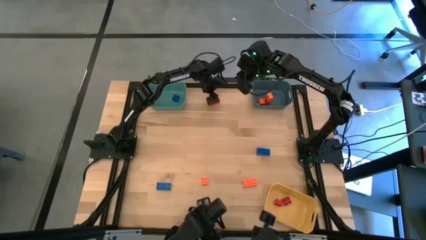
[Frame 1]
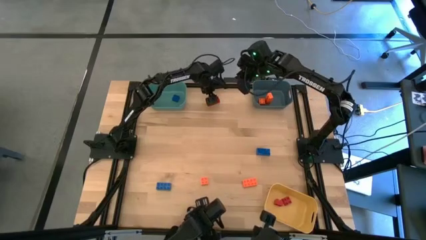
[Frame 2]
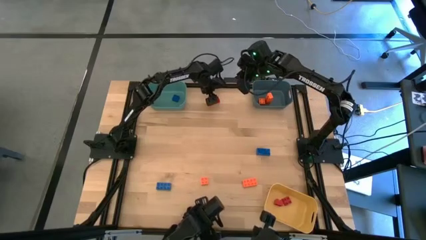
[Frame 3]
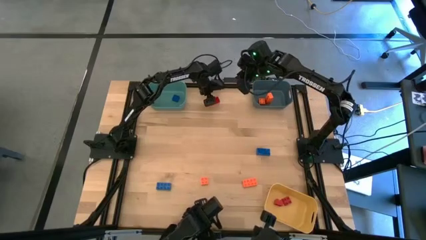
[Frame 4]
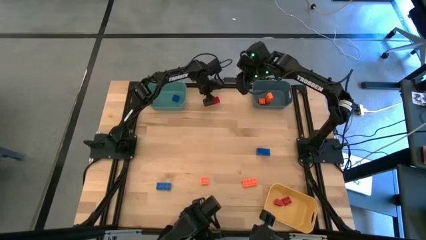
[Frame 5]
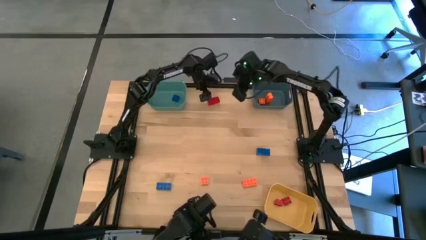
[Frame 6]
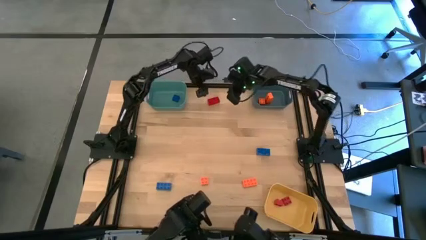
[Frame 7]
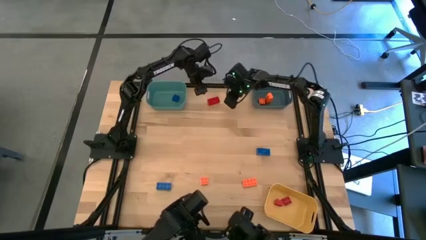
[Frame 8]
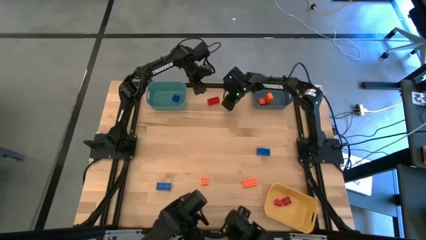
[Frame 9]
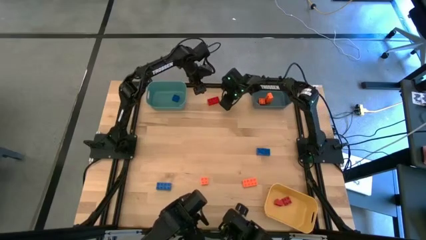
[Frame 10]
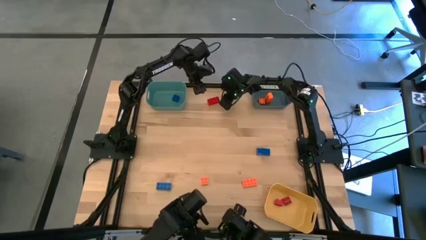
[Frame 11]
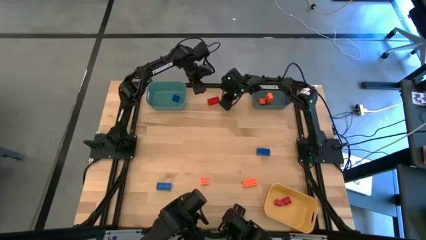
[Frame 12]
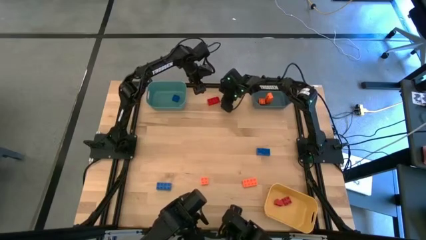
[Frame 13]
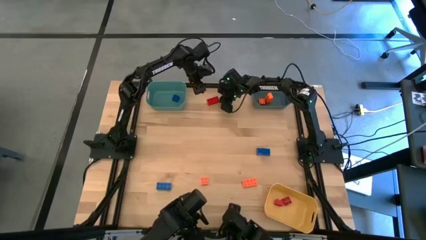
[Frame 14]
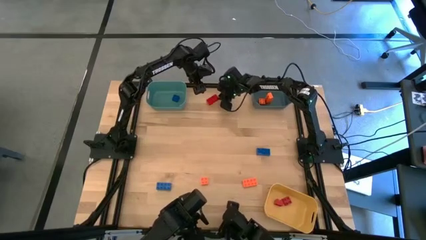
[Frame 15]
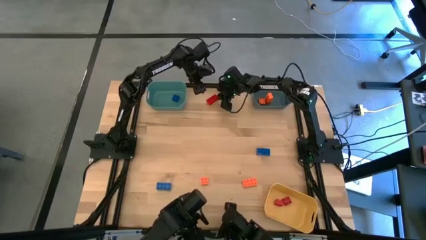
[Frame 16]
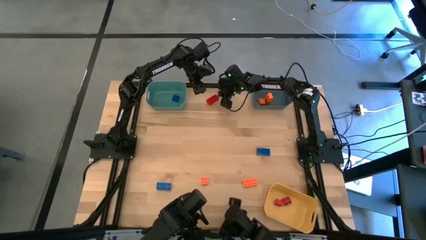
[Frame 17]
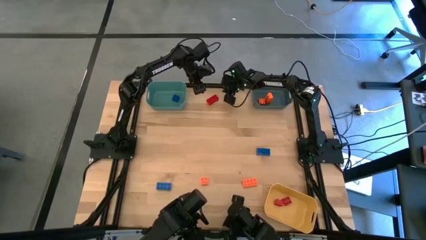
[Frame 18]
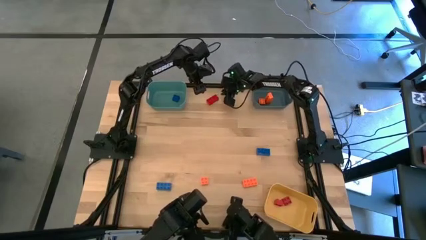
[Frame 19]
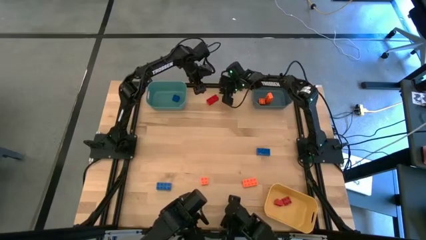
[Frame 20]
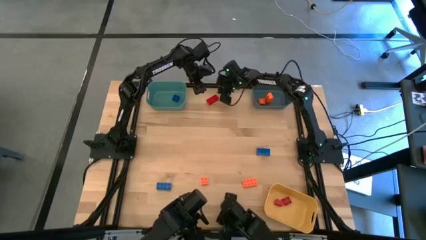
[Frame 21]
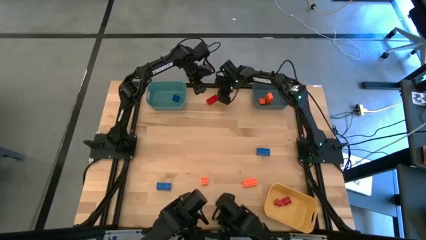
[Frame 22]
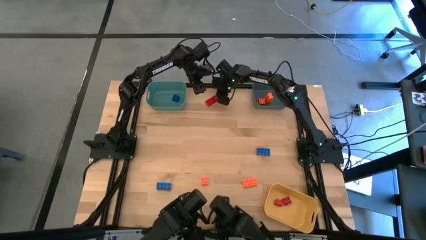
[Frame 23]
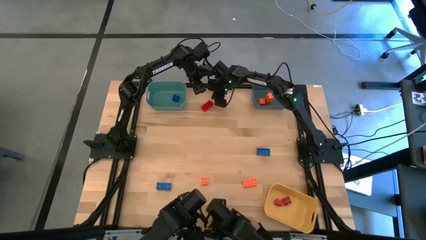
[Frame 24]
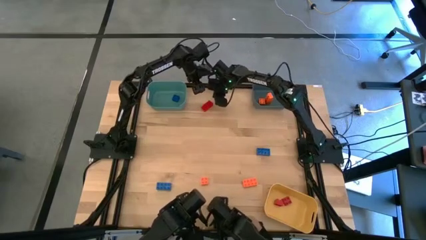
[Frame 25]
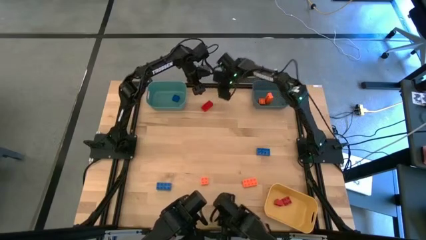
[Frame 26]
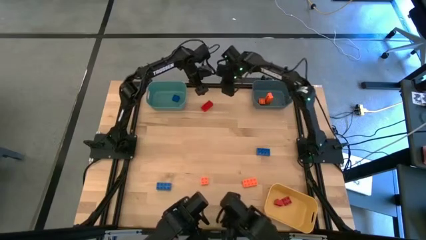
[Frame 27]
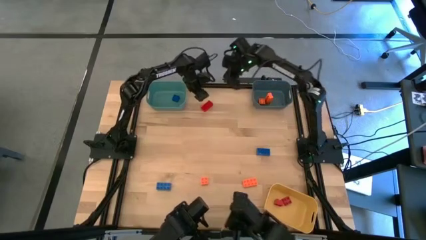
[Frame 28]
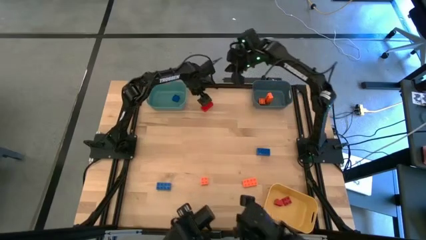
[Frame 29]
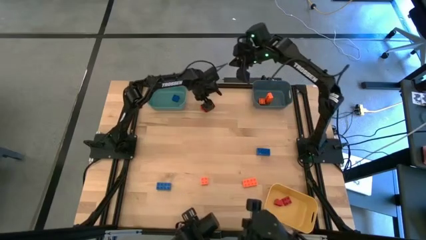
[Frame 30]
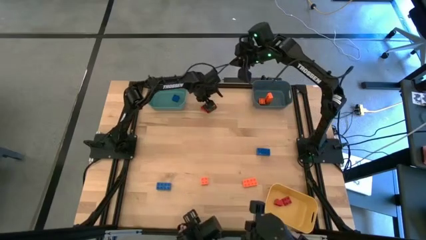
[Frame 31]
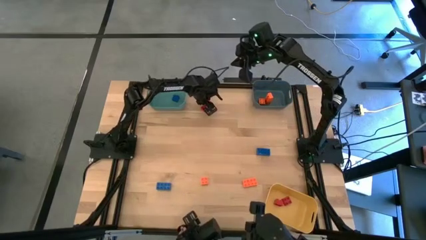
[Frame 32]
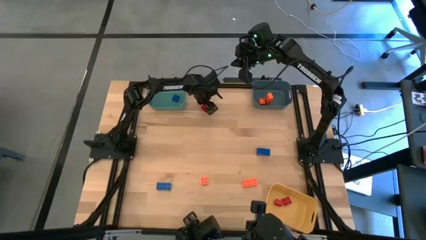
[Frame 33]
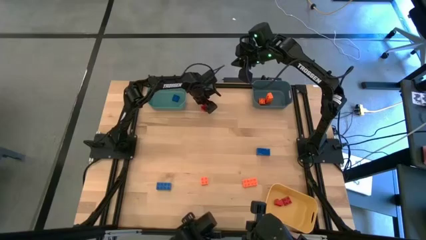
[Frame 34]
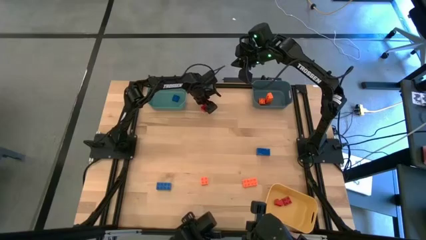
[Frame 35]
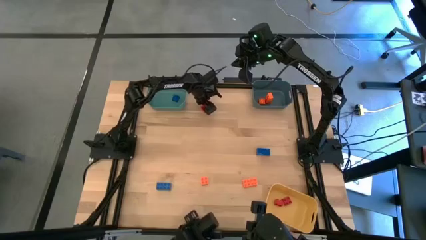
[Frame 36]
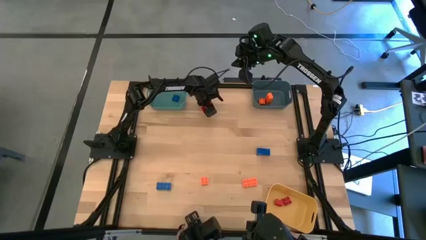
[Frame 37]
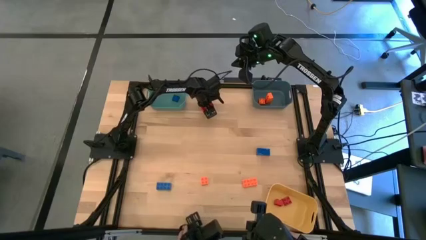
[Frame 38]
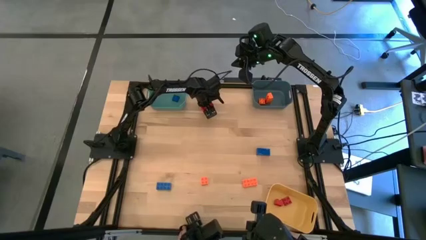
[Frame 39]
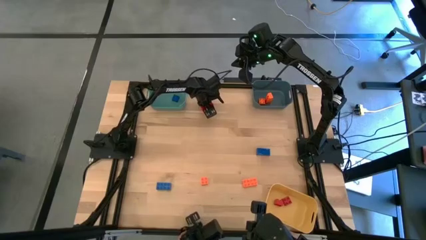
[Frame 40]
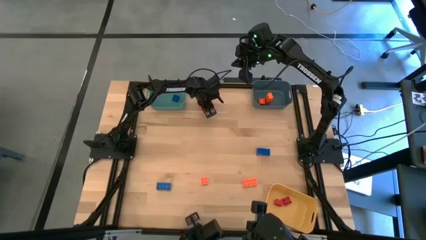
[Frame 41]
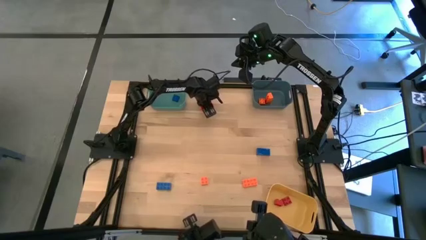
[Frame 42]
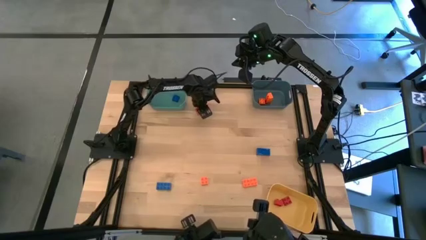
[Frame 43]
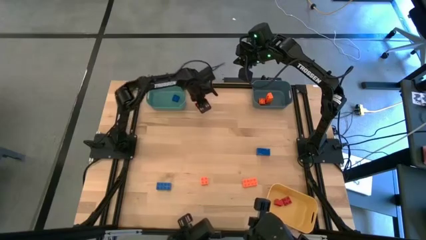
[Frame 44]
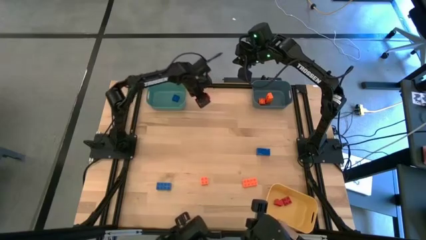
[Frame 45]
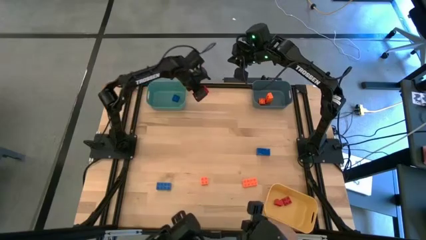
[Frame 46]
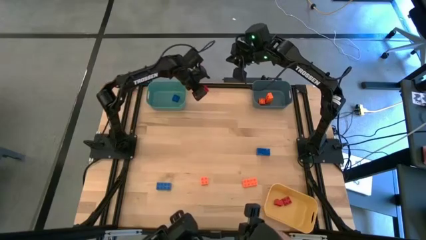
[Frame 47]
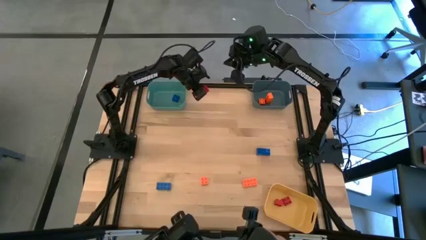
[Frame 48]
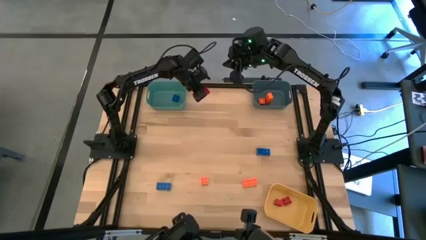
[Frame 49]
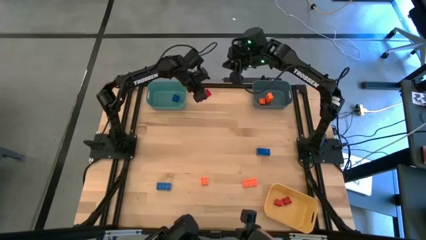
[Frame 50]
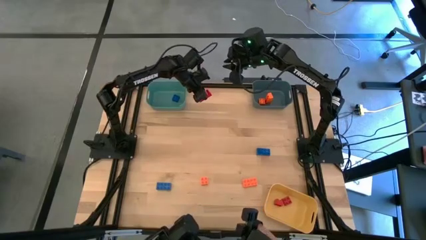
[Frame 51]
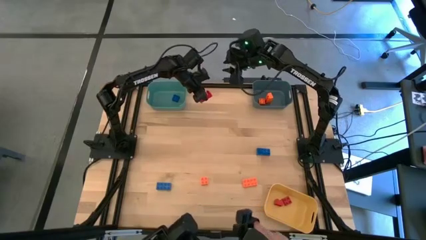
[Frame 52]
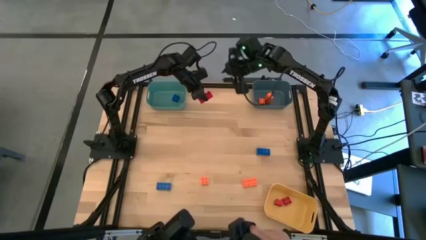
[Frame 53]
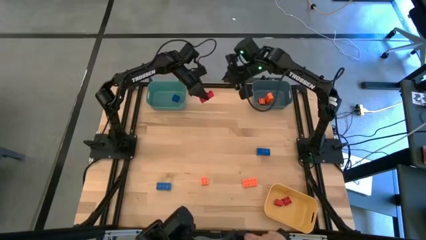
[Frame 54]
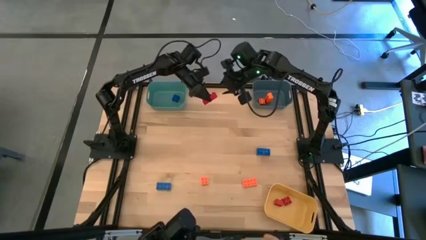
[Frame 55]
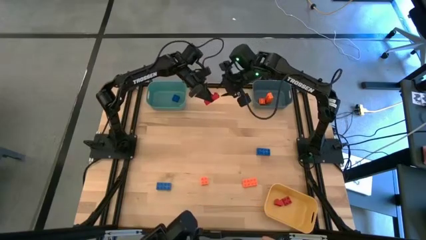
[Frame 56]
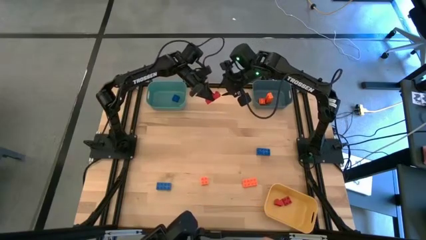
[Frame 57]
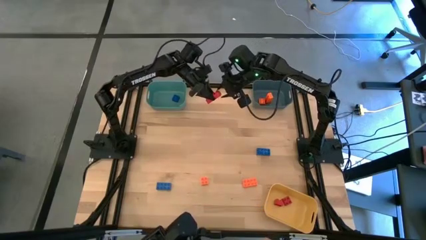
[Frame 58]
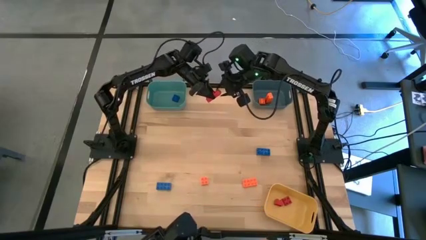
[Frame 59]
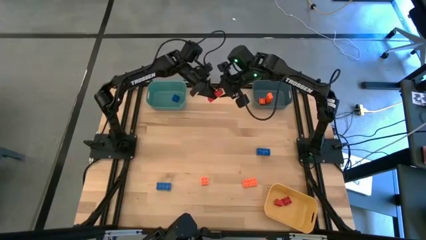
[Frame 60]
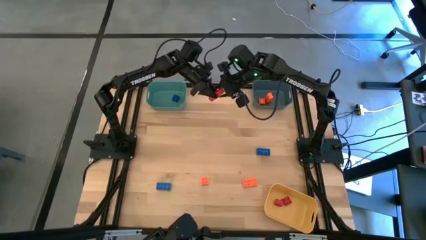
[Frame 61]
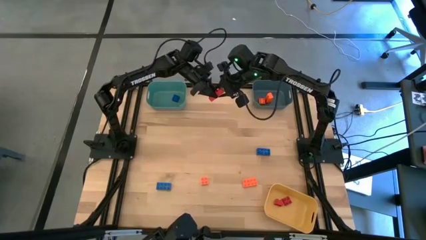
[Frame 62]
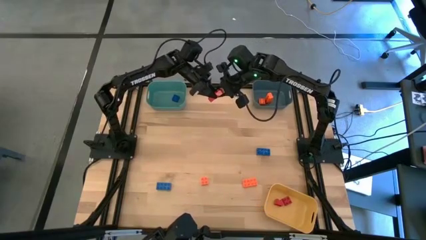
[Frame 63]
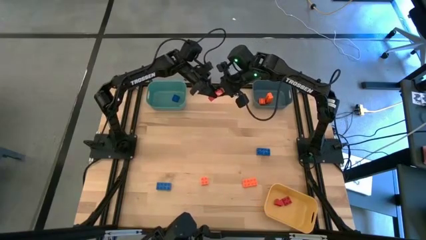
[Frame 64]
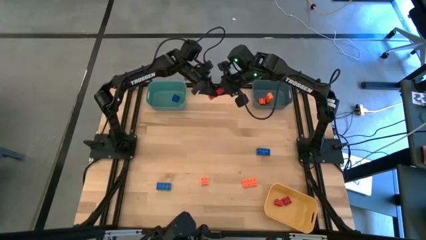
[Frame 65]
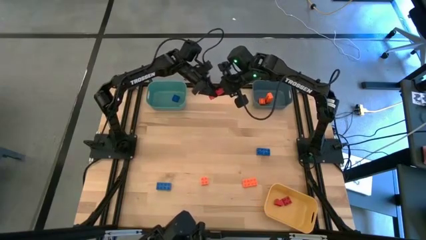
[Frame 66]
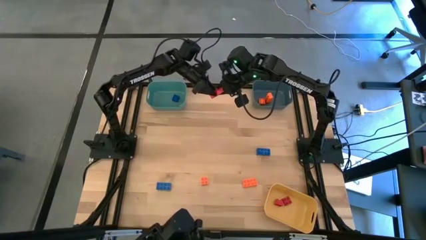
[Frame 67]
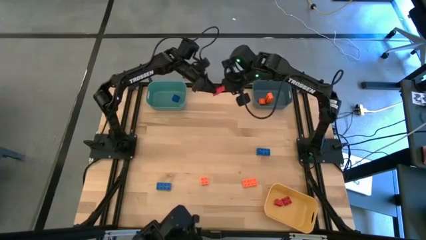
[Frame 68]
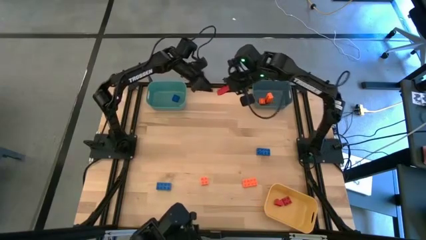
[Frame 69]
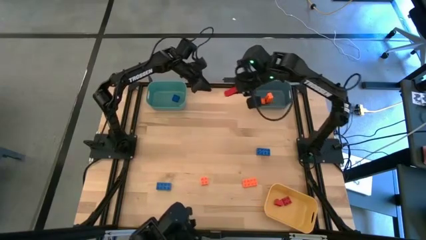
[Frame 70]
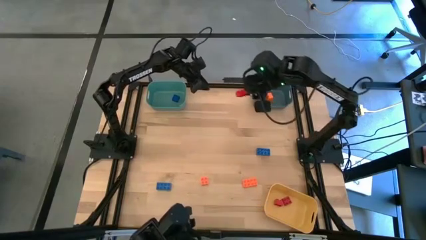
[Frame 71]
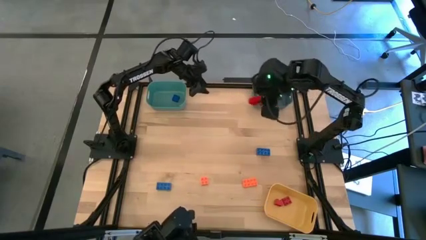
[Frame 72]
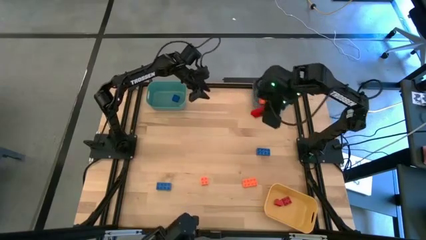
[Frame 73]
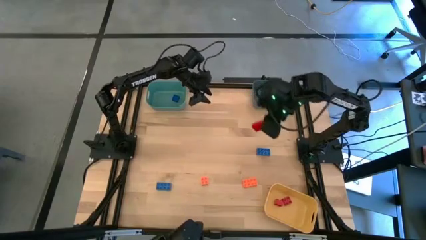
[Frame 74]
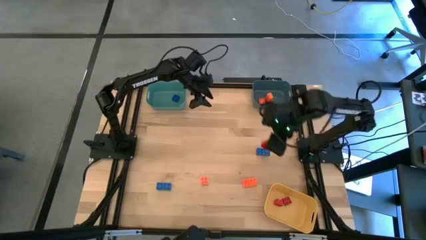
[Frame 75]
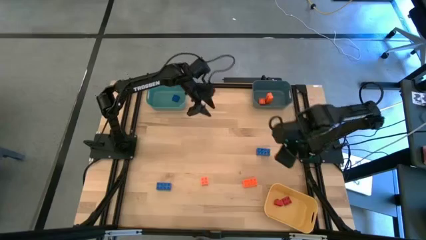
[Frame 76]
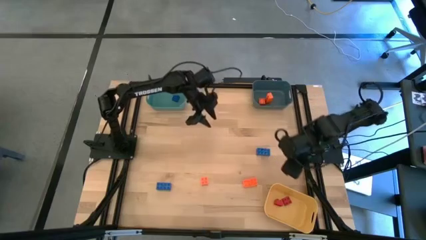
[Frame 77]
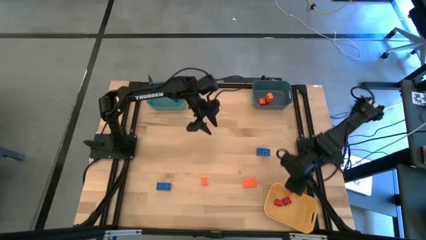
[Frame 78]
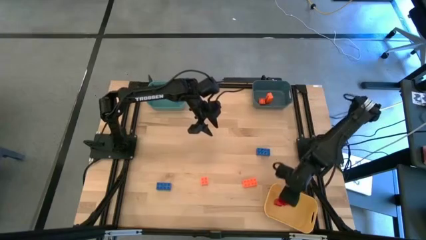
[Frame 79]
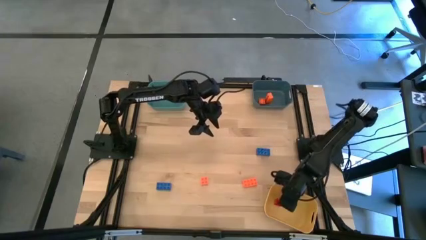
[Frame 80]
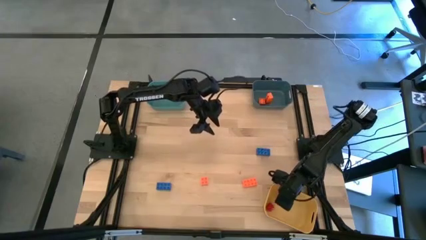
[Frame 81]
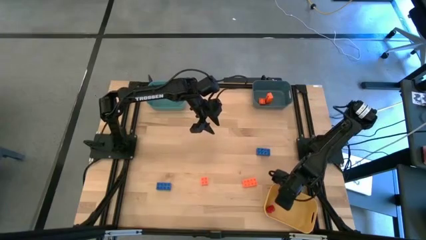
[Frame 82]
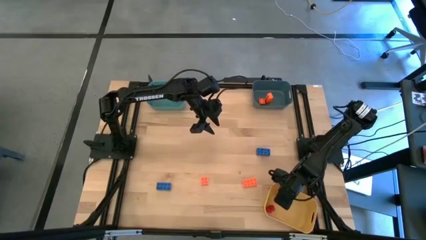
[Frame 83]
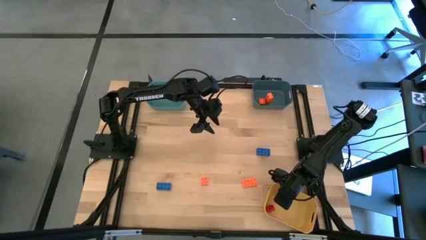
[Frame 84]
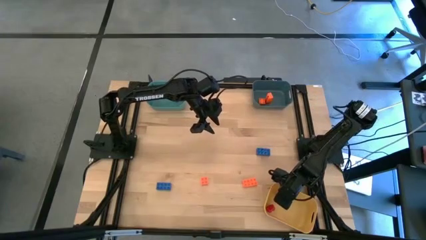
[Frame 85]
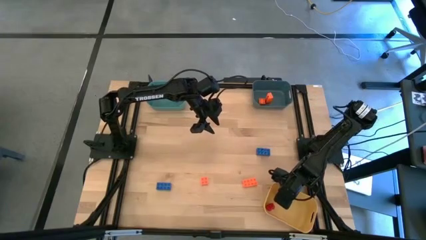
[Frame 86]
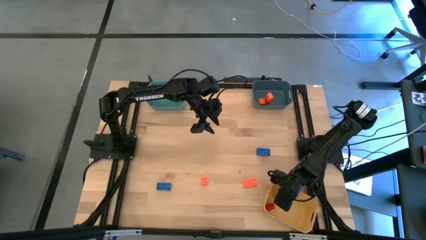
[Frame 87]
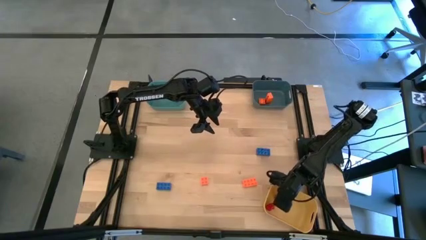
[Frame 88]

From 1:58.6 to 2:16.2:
Task: Sort & place blocks by color
Put the red game piece into the yellow bin
